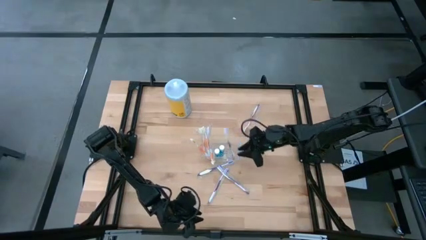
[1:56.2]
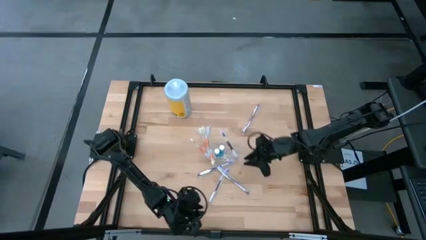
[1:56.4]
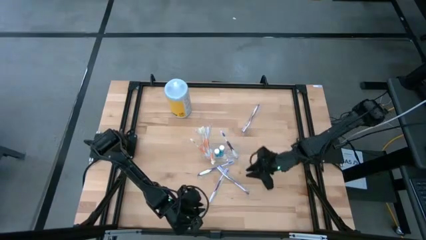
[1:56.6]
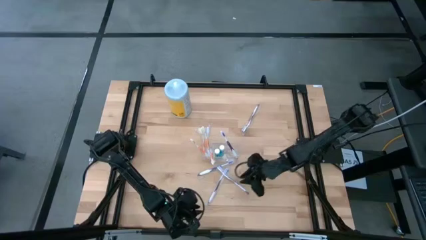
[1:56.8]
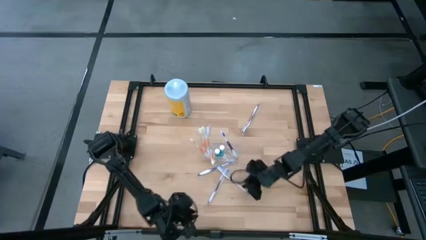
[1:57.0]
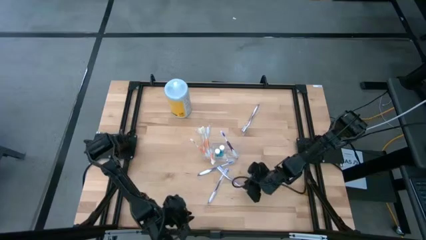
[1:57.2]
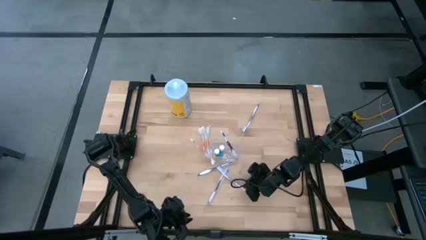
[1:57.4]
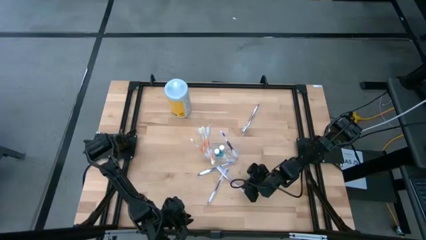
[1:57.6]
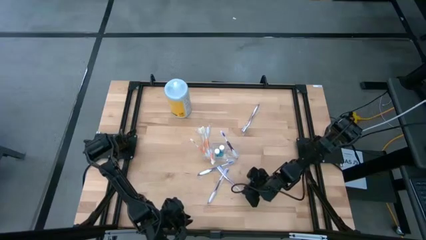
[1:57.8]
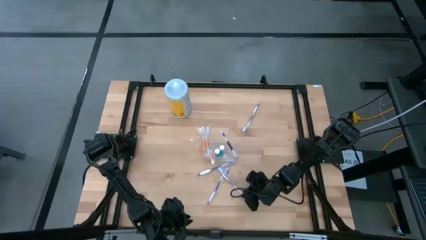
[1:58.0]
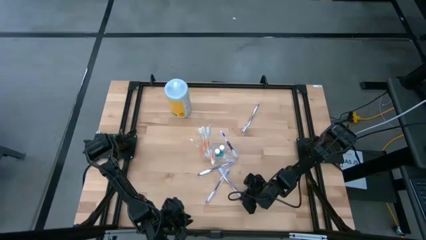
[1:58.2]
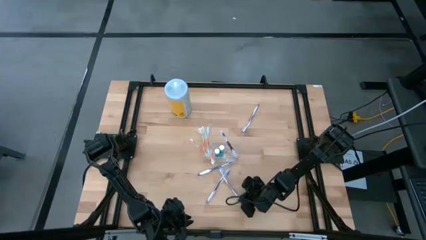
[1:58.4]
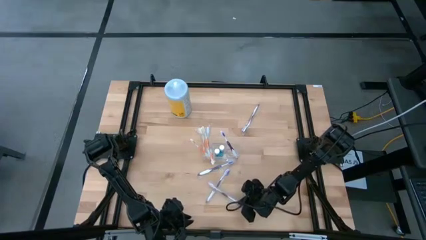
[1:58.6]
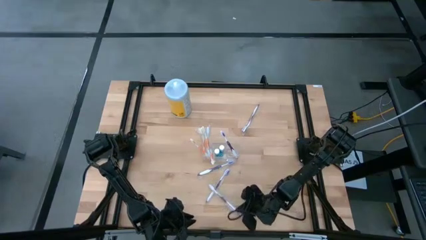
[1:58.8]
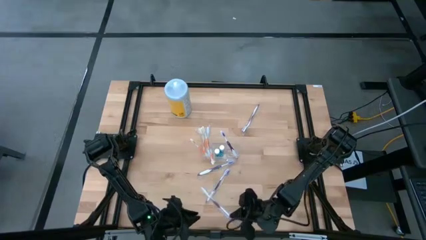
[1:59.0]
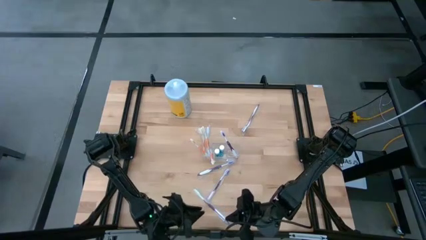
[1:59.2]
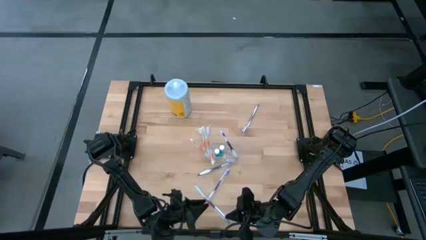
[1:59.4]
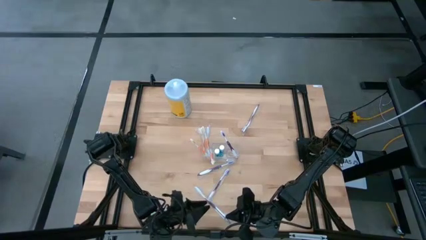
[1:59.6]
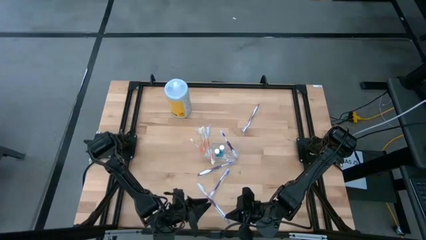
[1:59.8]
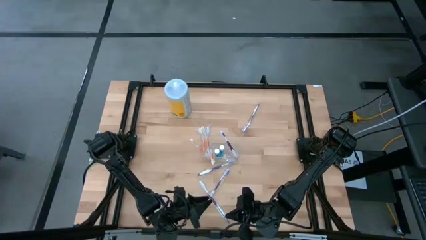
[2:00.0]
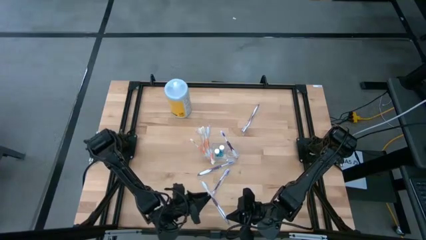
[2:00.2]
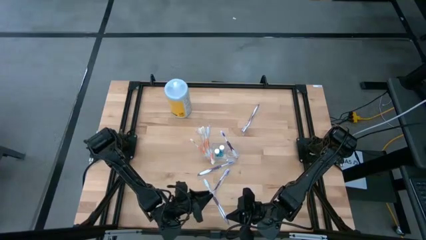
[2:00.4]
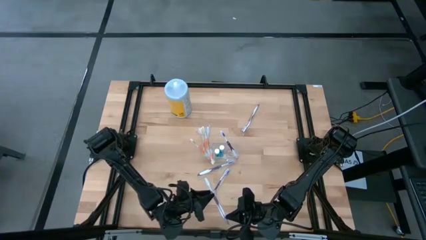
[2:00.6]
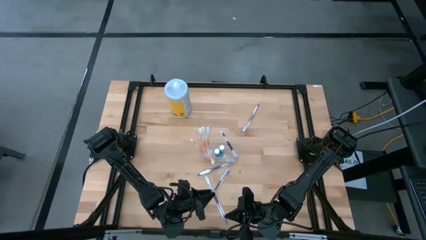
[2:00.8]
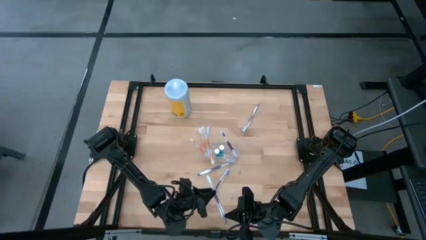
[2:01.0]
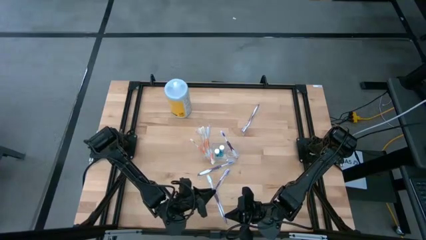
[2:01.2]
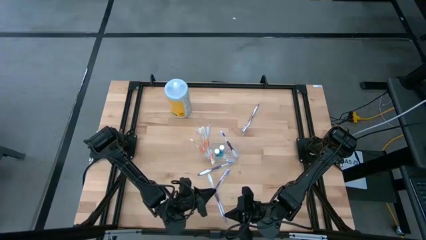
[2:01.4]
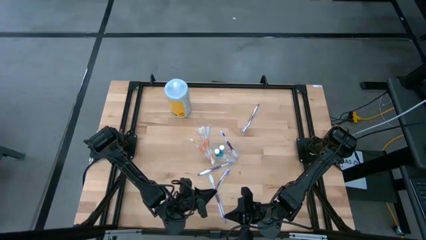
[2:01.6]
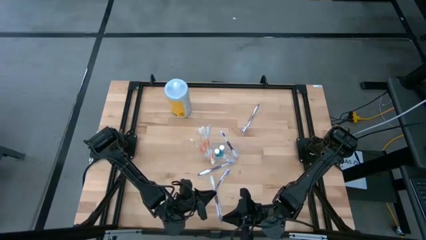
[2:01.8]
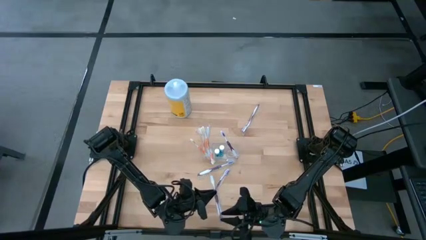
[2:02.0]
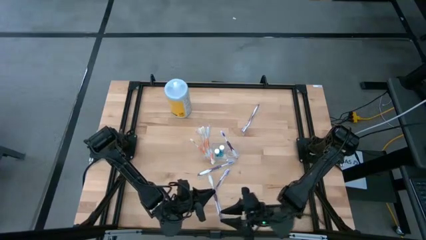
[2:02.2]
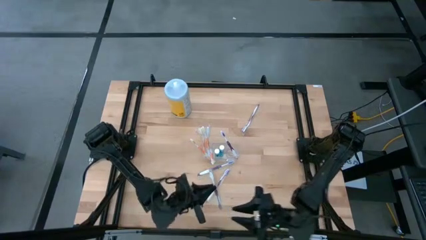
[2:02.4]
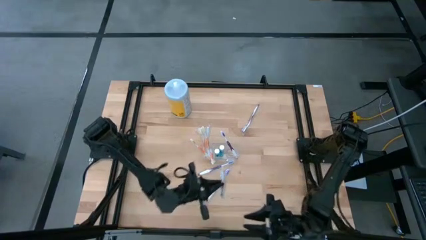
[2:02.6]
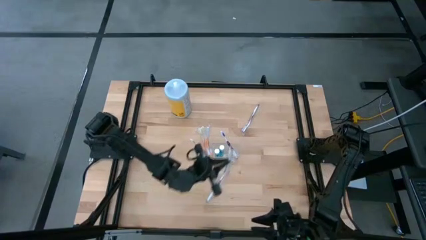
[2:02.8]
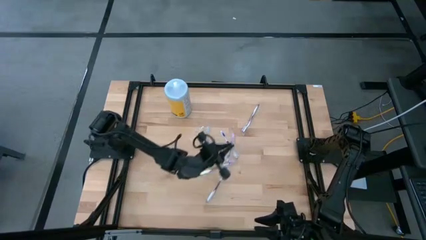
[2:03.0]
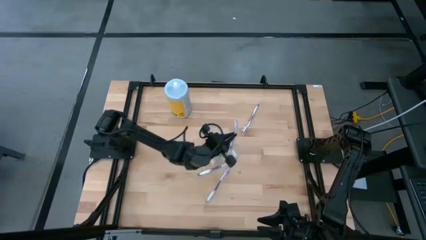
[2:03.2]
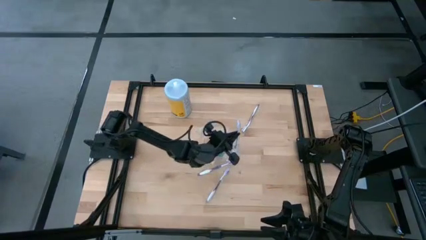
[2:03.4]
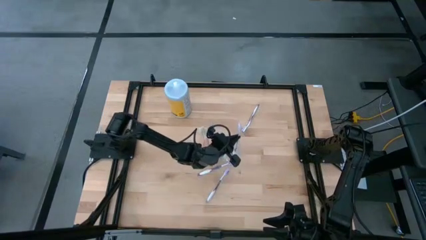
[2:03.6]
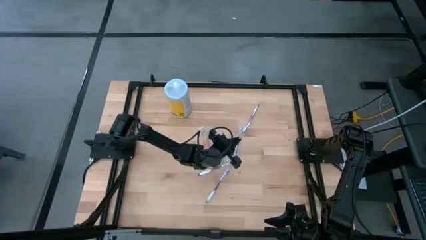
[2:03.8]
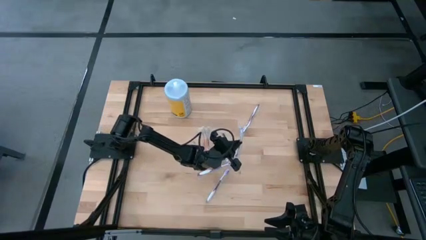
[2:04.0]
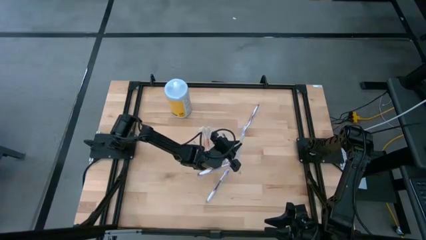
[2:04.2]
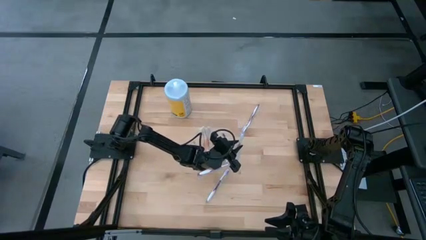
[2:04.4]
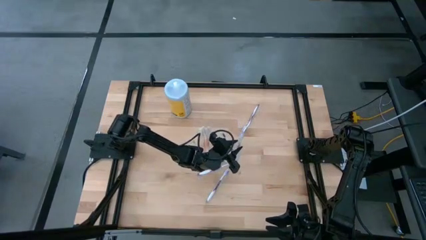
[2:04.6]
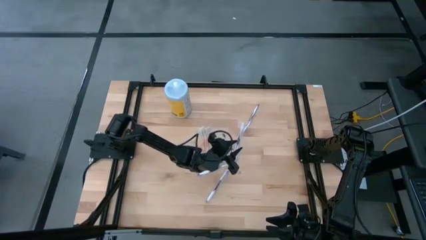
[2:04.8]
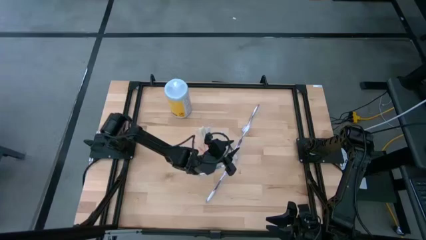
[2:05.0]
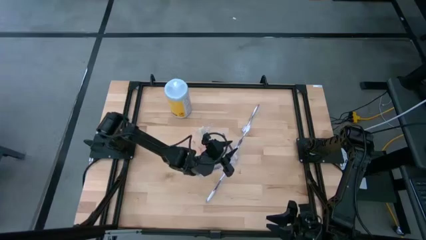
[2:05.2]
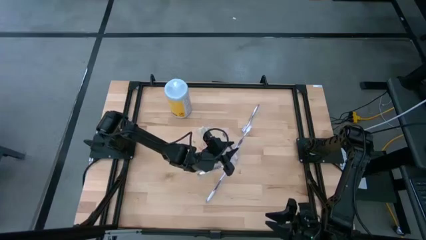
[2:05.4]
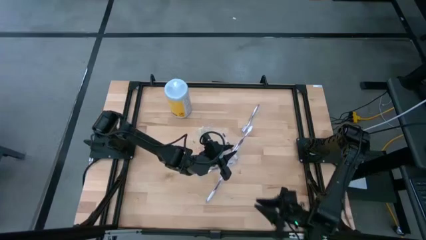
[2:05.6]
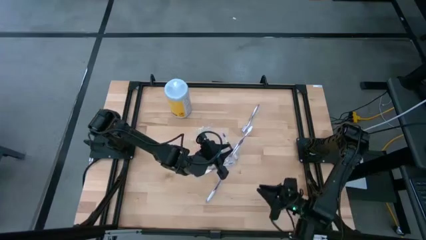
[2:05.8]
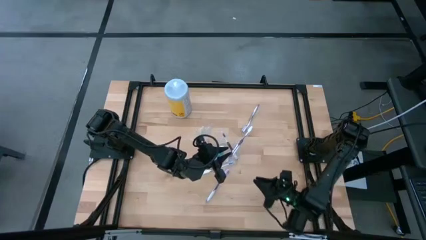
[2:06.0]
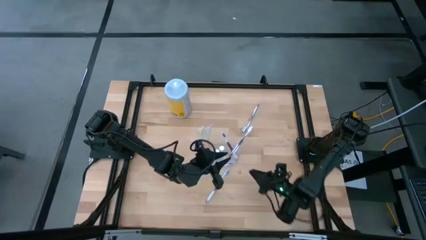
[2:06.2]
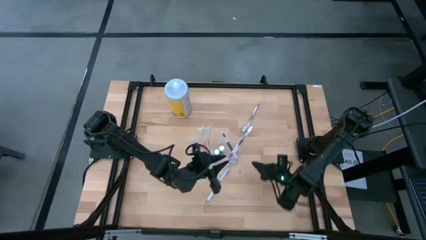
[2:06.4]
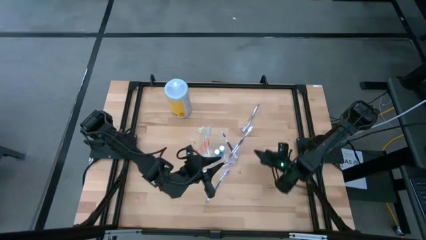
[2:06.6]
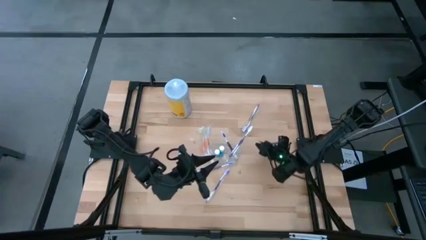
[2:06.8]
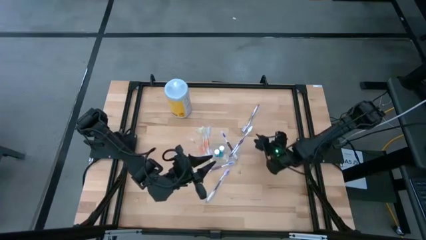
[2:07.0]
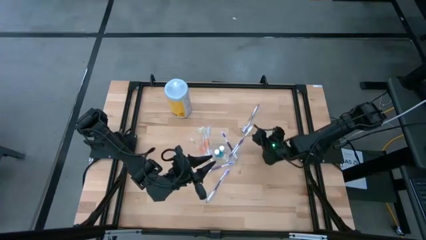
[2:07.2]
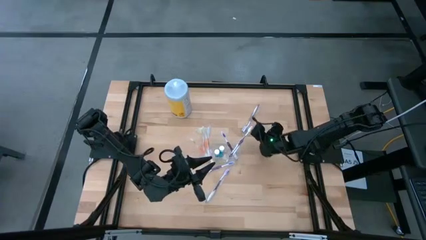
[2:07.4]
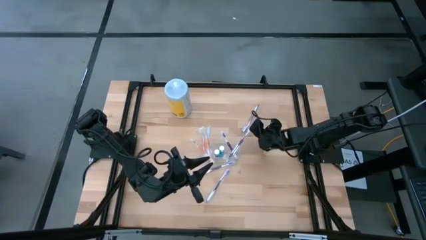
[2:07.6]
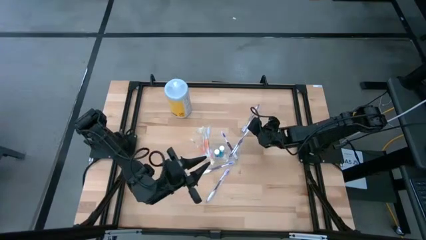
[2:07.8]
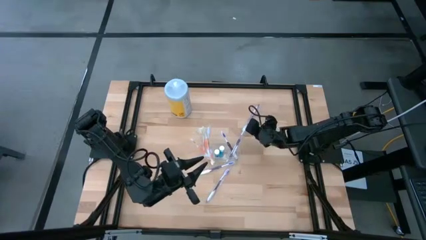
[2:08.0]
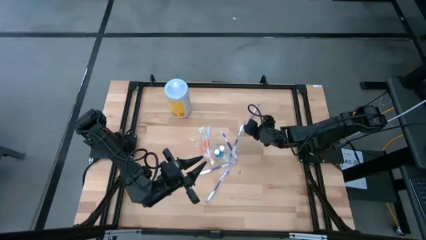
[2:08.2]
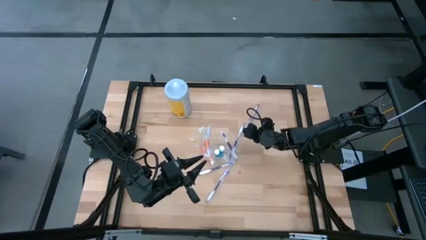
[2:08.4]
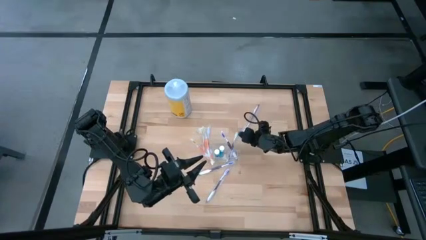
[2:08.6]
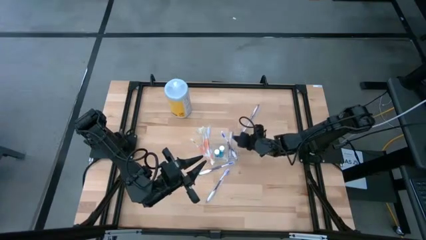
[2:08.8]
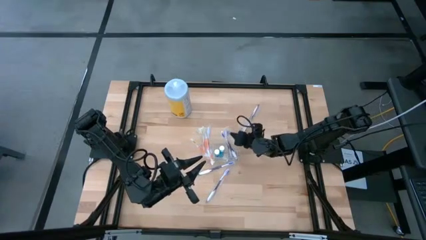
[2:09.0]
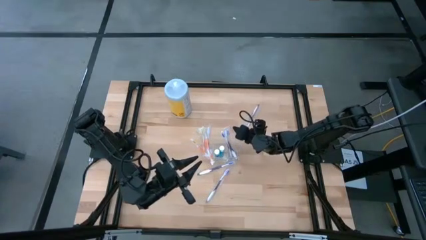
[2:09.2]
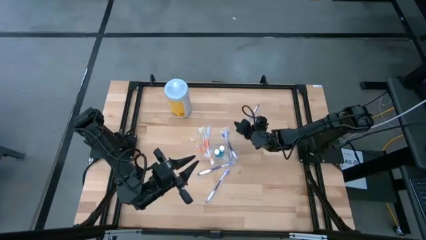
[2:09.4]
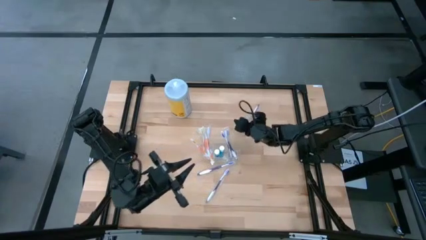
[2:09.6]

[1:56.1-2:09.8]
Task: Pick & Place toothbrushing station
Put the white and violet toothbrush into the right compartment of the transparent organizer

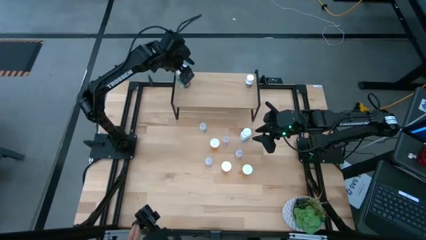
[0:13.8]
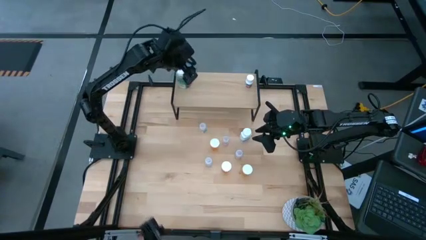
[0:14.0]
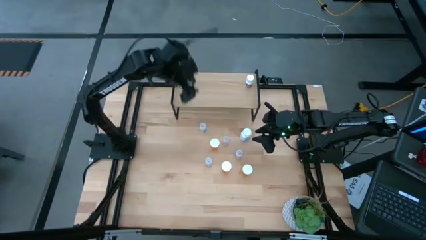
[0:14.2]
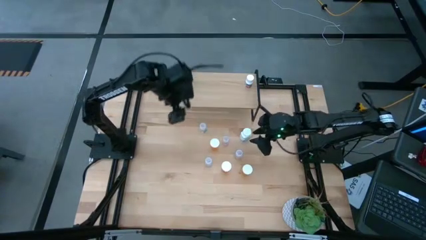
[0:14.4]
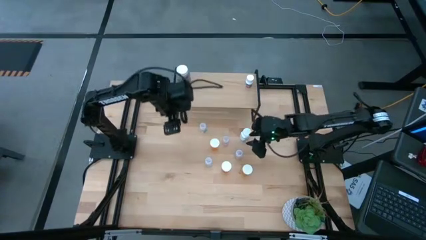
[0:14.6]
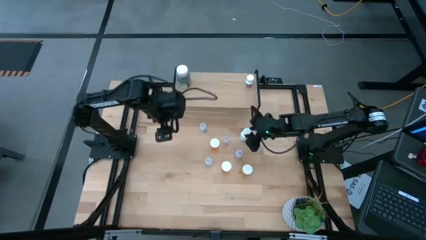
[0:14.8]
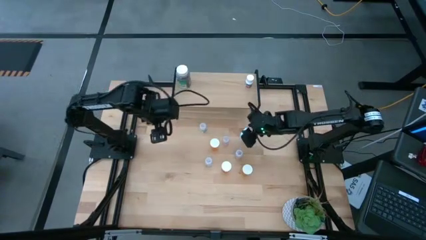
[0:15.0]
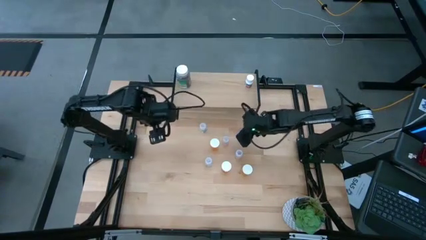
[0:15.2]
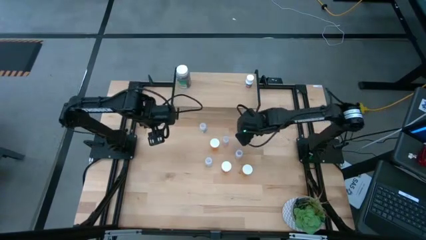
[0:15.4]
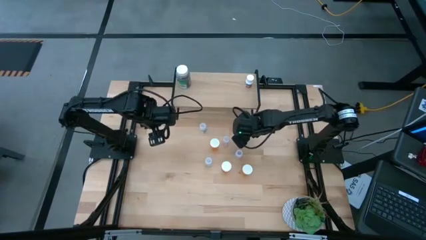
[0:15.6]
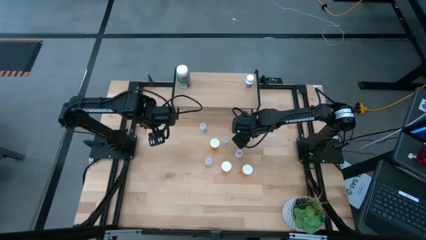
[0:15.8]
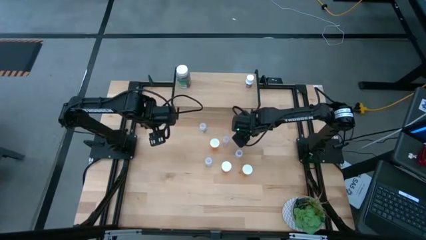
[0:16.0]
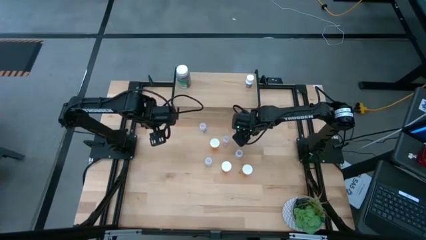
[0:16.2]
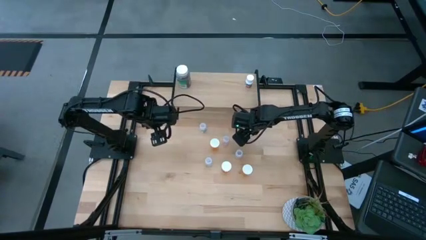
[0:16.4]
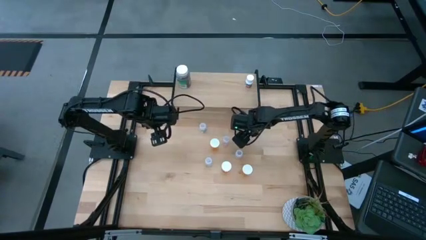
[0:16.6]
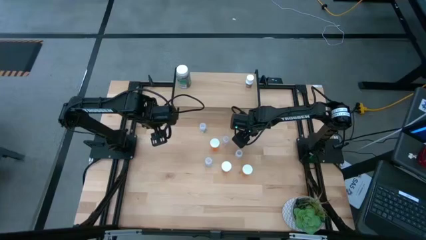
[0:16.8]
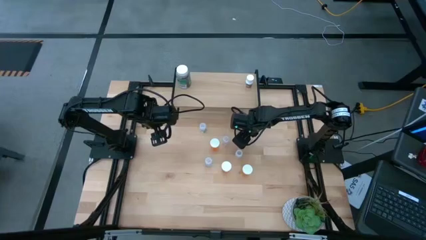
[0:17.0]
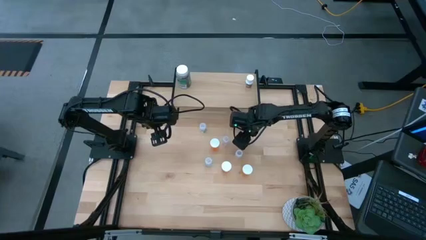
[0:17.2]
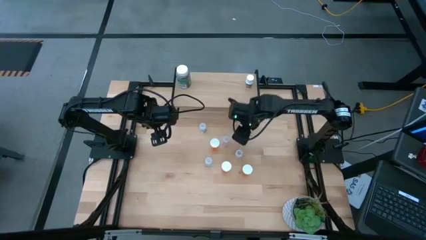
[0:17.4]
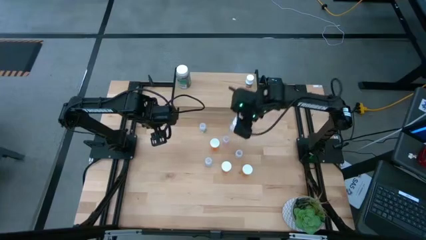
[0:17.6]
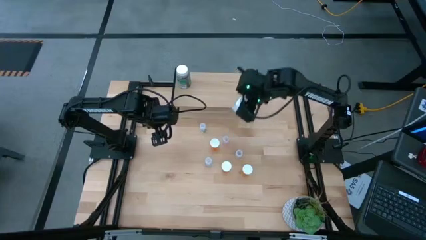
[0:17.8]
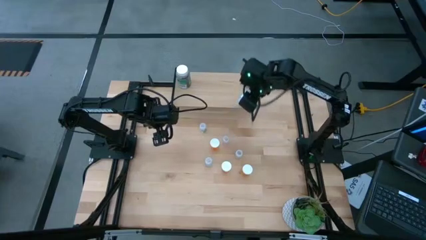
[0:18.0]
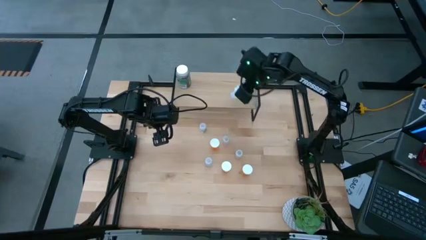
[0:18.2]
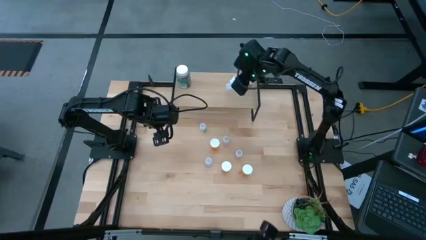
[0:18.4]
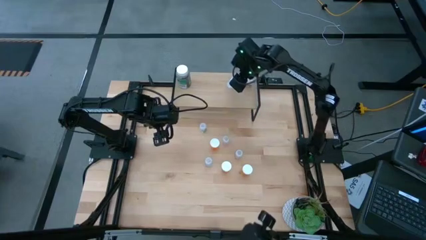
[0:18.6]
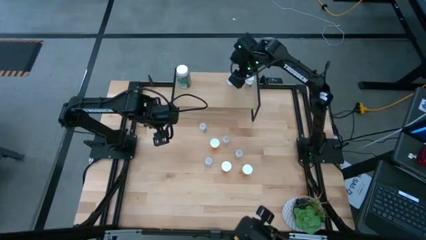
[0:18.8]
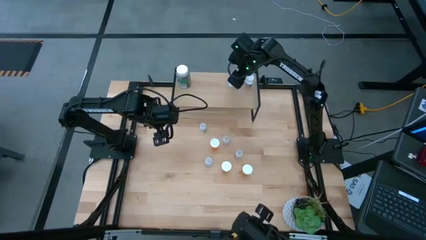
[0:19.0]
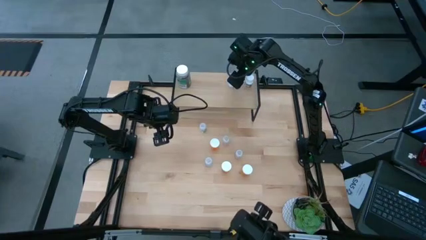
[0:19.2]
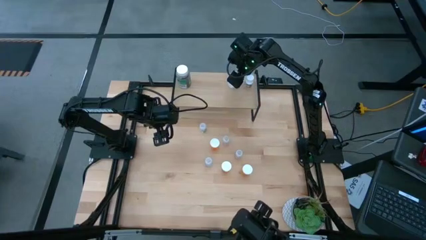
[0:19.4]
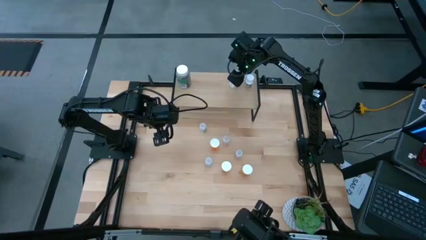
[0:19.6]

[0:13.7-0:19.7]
Task: Pick and place medicine bottles onto shelf by color
Put the blue pill bottle on the shelf
